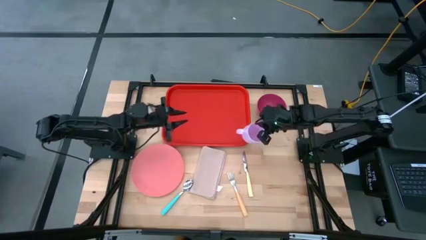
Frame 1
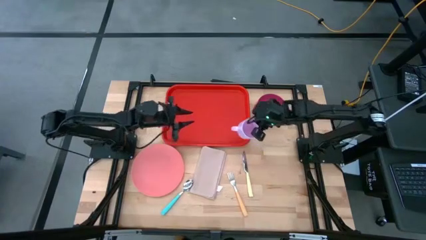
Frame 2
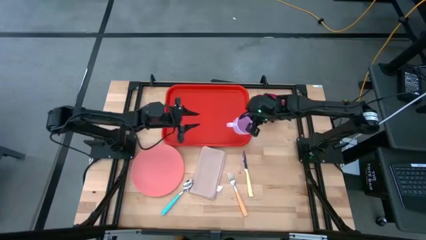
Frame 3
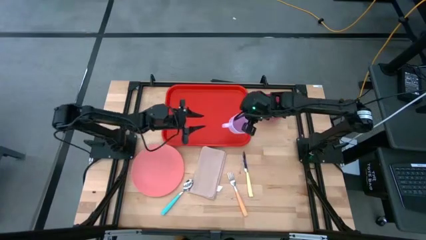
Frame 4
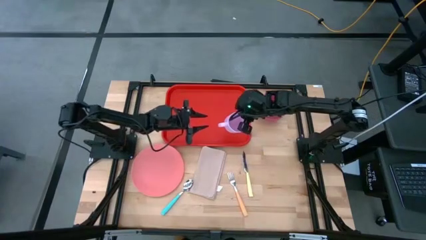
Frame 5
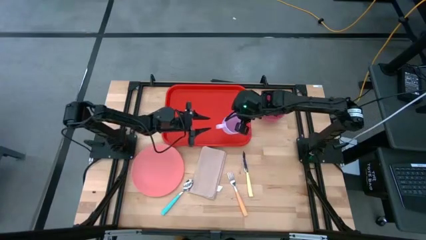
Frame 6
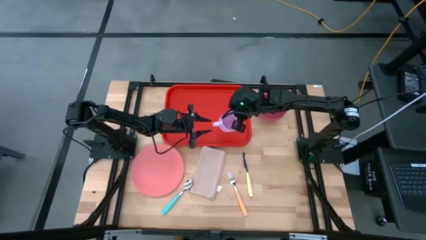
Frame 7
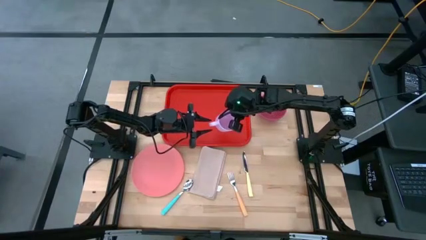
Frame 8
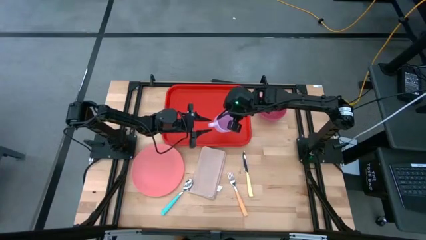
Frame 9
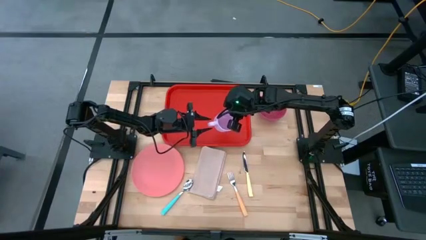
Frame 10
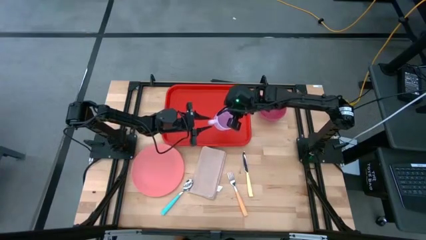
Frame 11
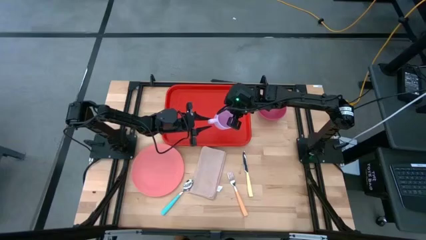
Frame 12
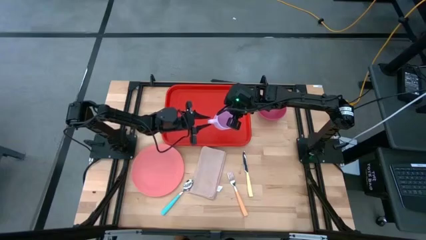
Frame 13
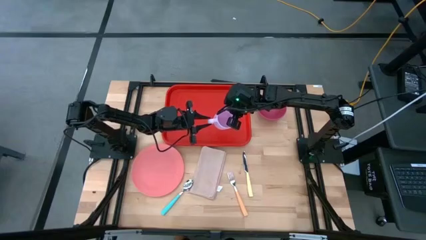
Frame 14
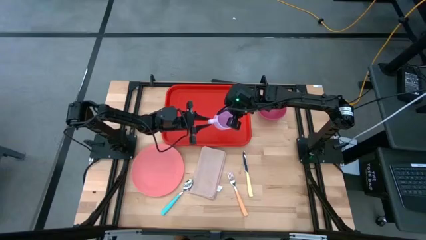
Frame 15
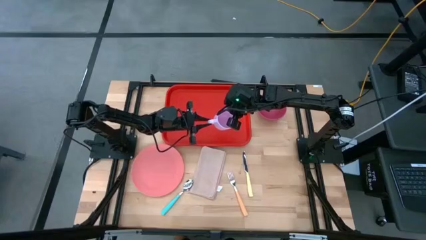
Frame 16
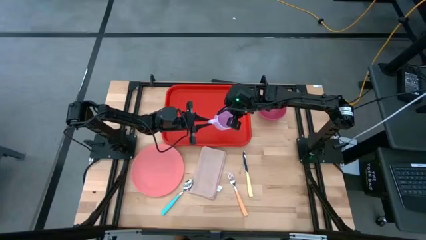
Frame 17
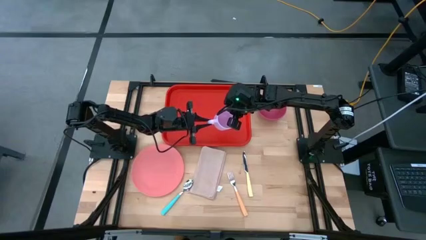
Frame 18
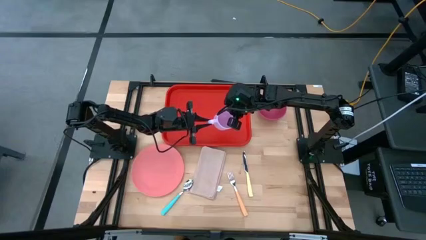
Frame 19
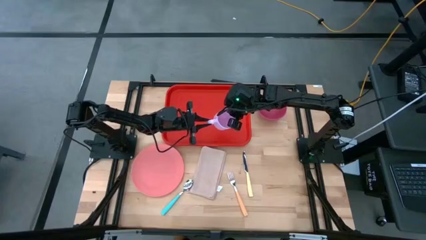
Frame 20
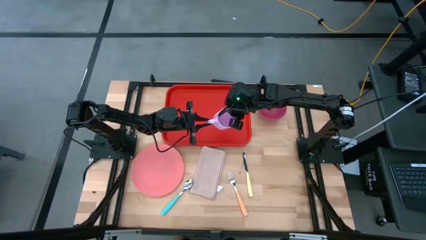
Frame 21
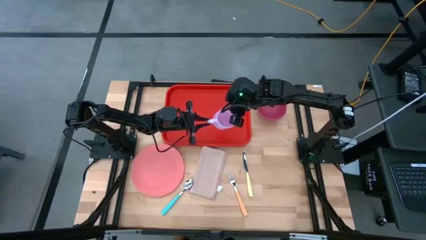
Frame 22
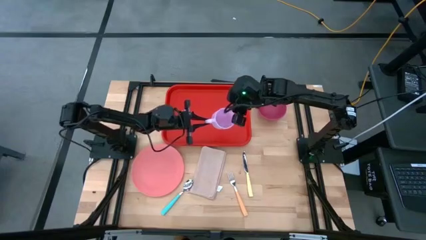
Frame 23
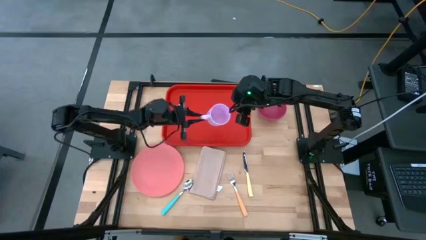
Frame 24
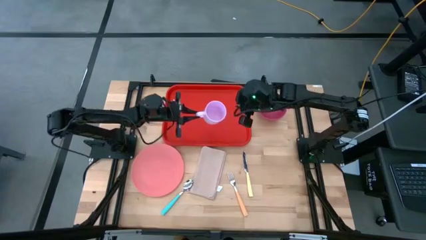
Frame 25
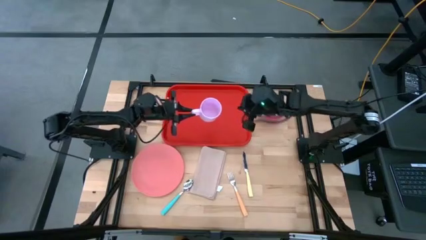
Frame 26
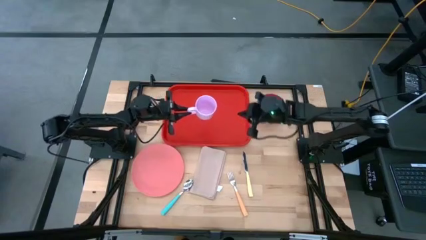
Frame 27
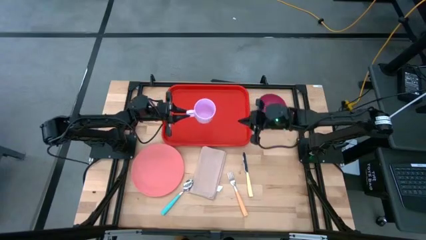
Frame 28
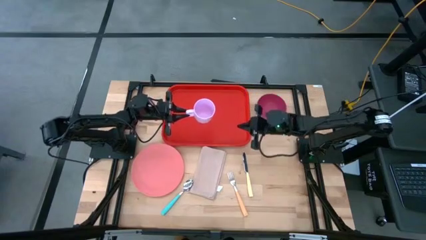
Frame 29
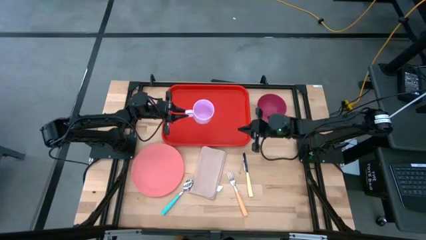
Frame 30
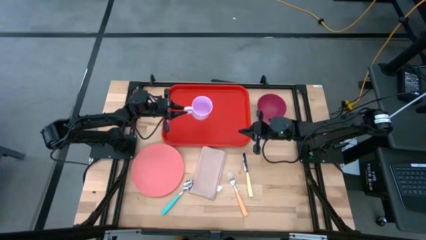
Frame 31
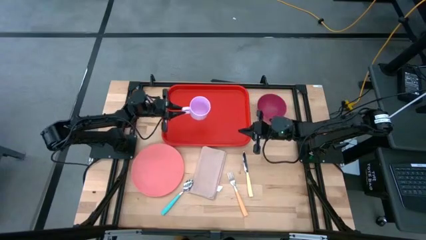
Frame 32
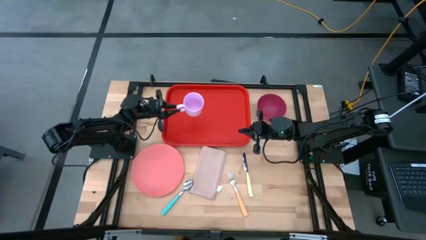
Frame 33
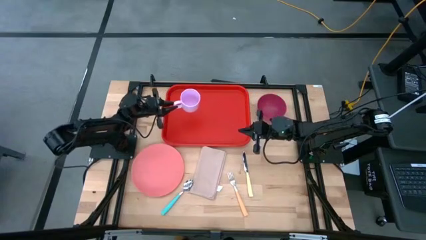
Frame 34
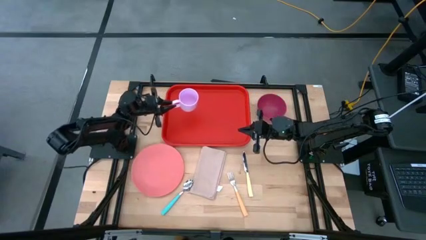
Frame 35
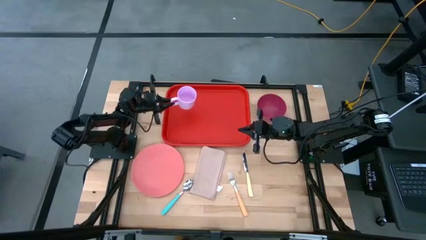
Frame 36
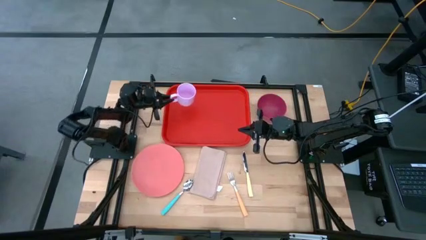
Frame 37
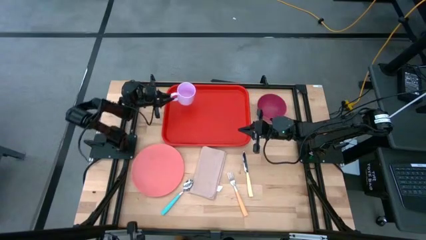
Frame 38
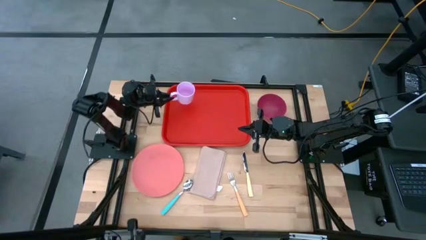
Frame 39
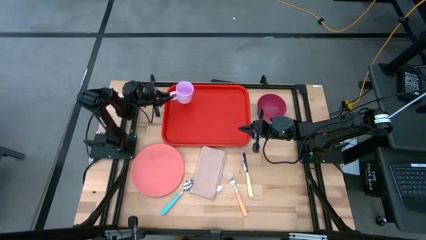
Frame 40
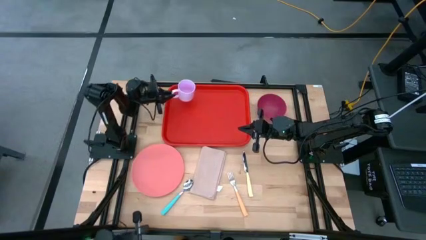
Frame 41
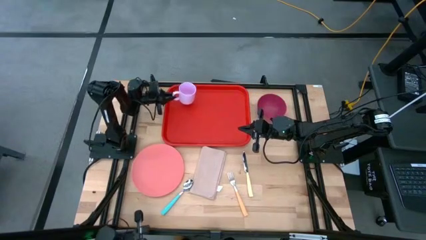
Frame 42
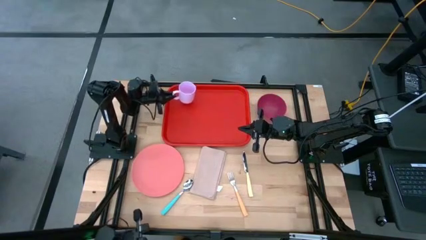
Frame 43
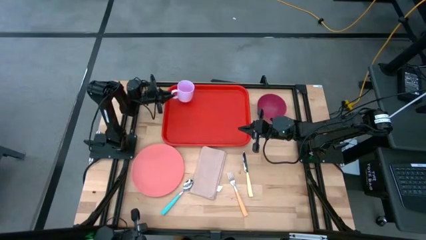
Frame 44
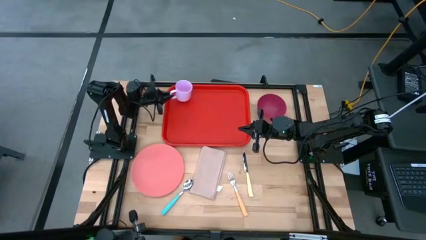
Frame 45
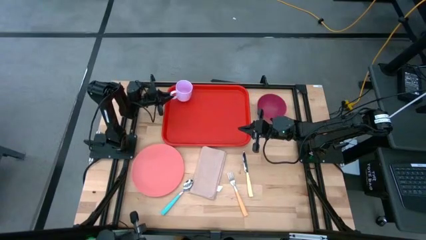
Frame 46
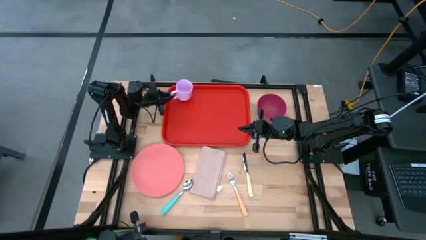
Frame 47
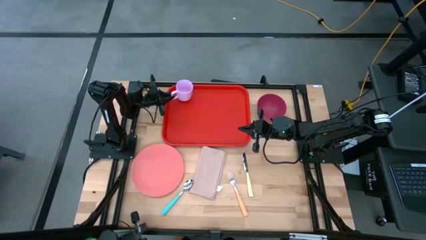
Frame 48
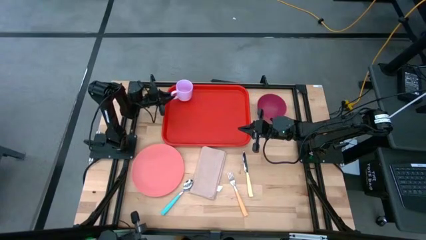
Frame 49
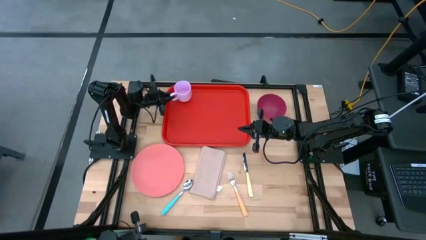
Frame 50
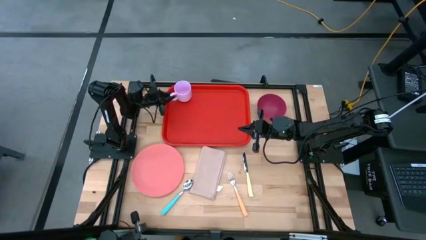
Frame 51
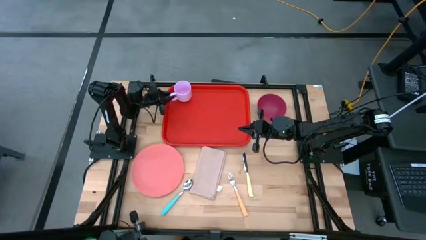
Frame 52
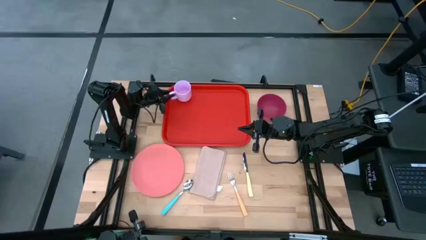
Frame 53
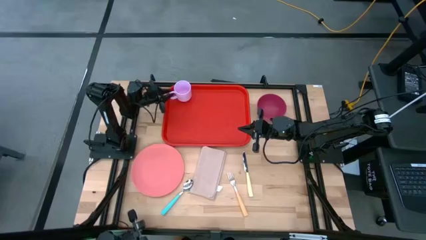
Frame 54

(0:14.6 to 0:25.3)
Task: Set up tray
Put the purple mug on top of the orange serving tray
